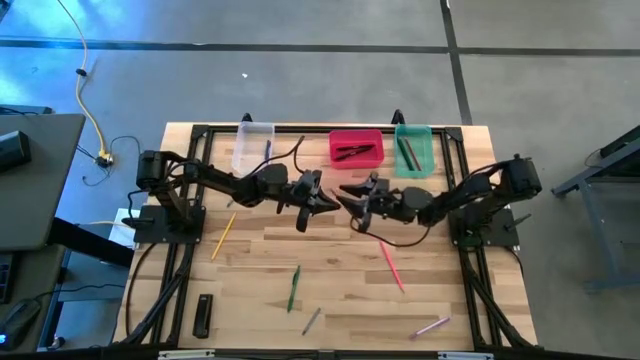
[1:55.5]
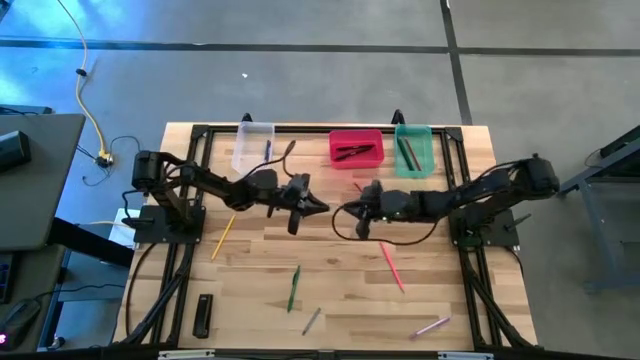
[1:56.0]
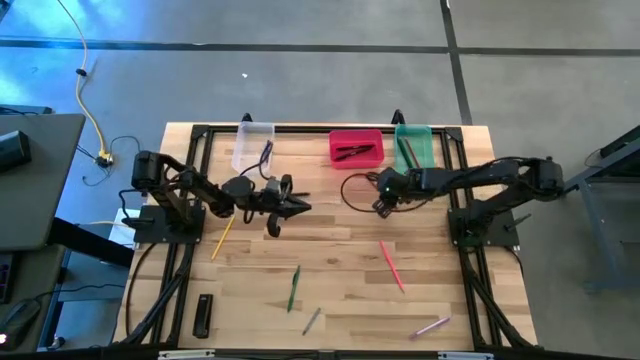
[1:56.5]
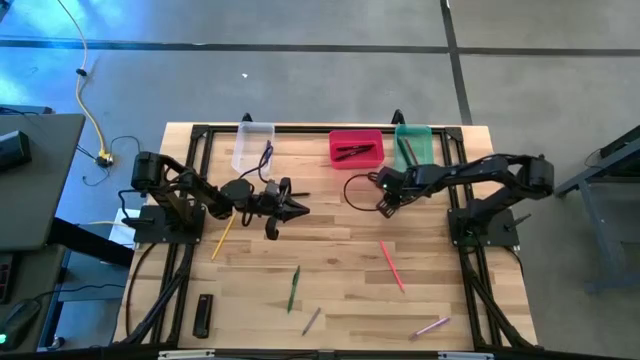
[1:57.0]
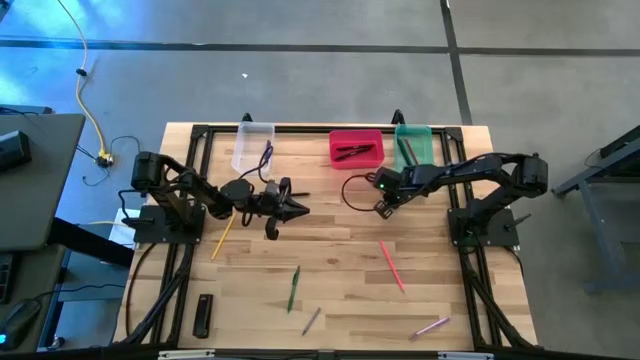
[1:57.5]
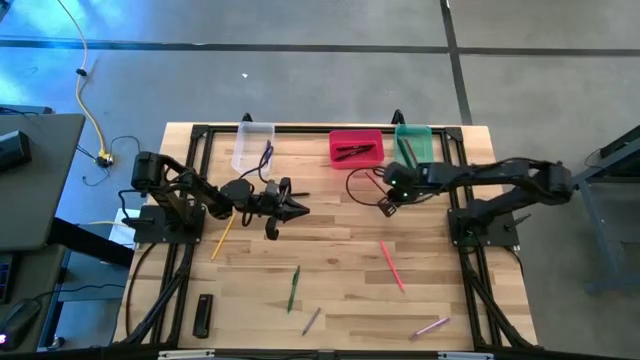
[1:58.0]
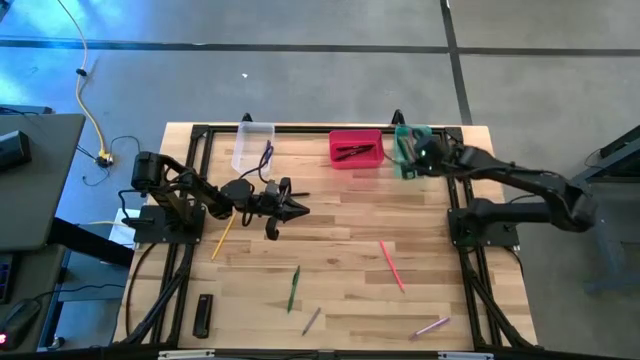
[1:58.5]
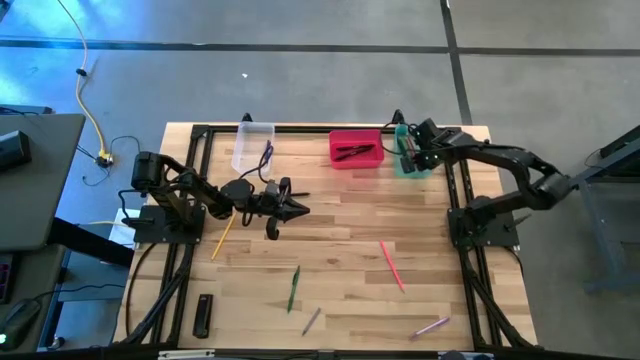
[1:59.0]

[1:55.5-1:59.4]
Task: Sort crayons/erasers/pens/pencils in bins
Put the red pencil into the blue bin

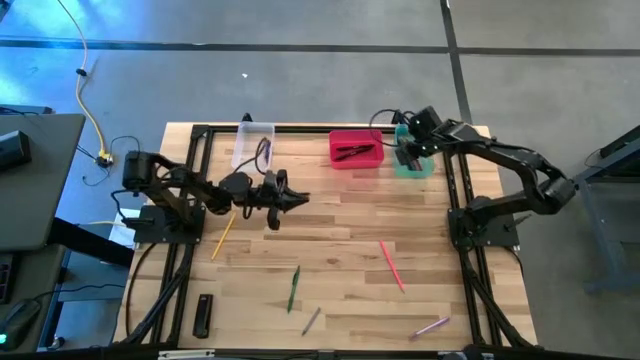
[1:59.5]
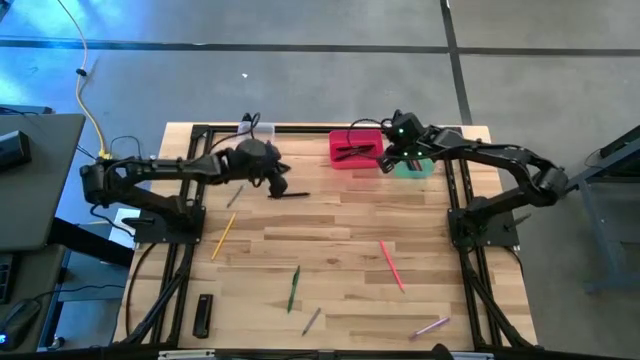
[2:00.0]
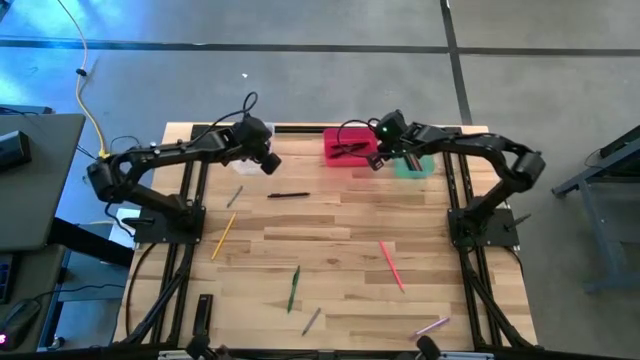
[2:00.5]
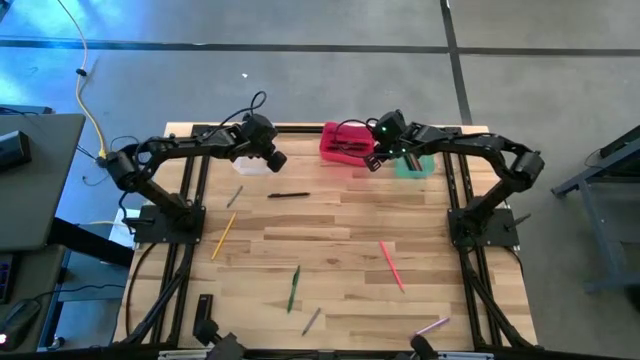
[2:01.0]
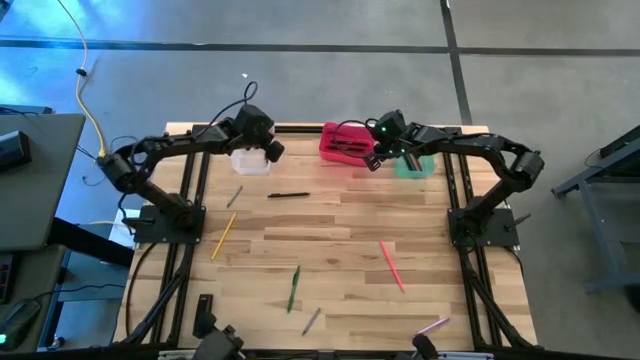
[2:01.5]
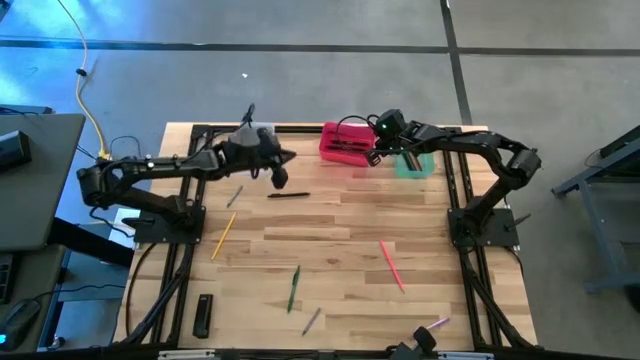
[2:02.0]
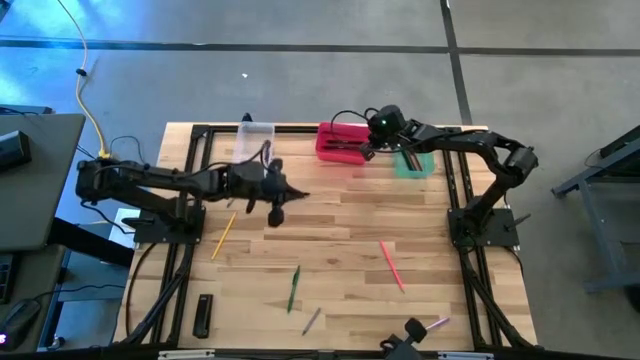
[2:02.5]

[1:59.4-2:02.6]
Adjust the red bin

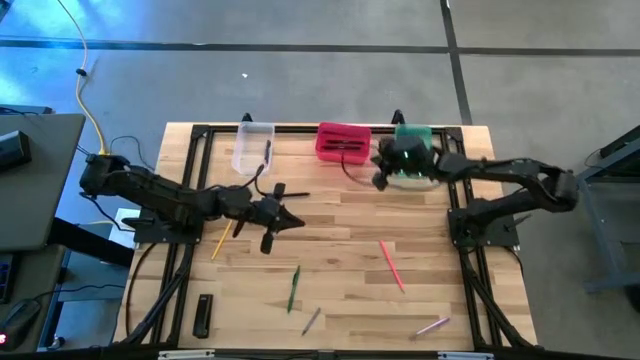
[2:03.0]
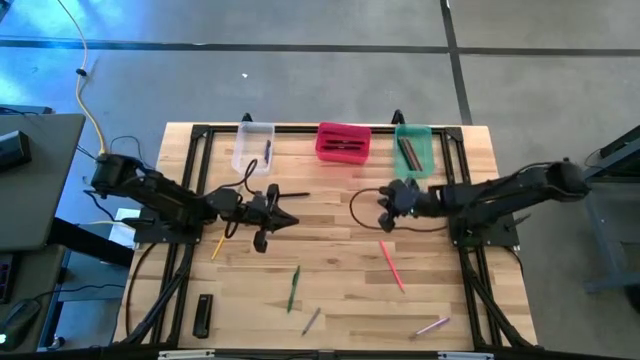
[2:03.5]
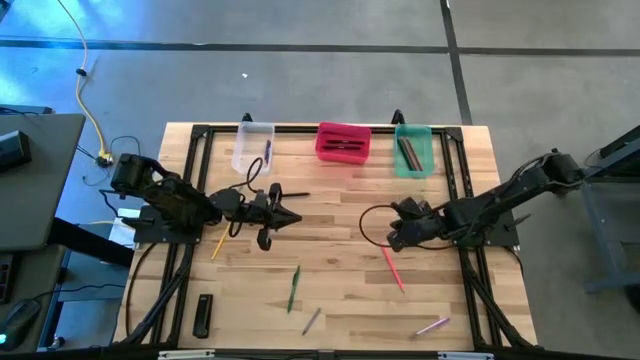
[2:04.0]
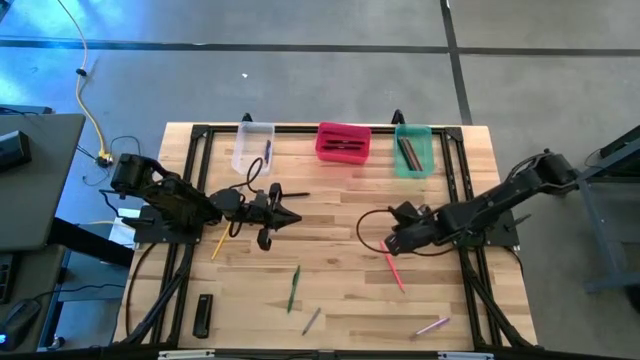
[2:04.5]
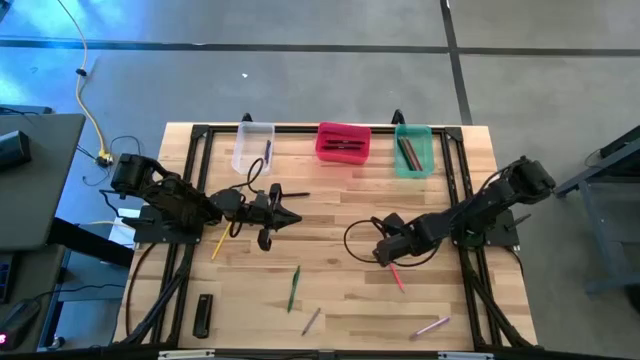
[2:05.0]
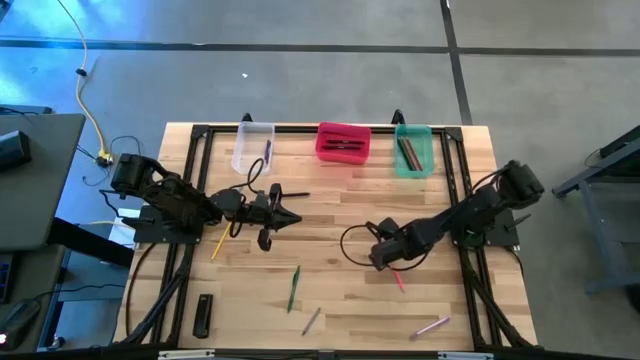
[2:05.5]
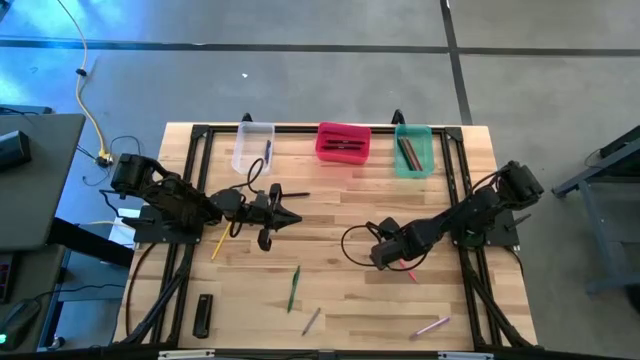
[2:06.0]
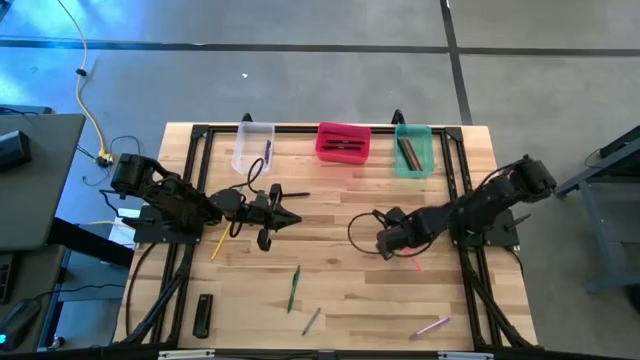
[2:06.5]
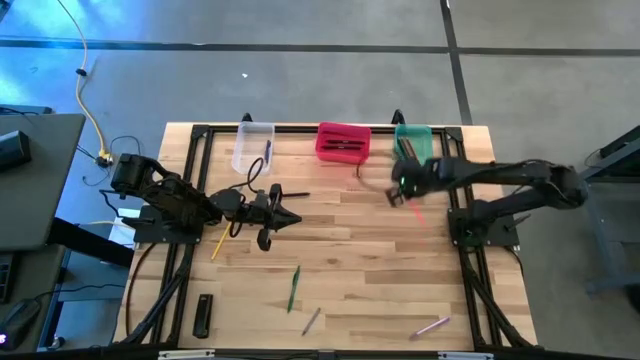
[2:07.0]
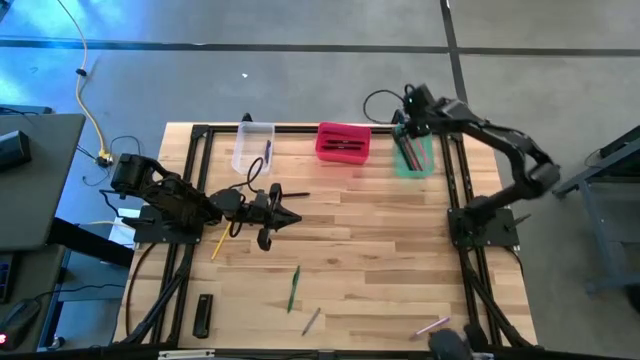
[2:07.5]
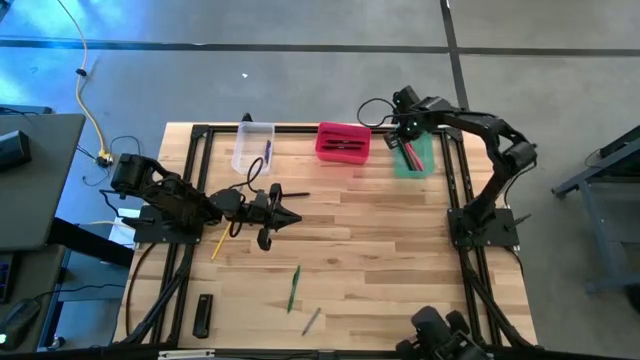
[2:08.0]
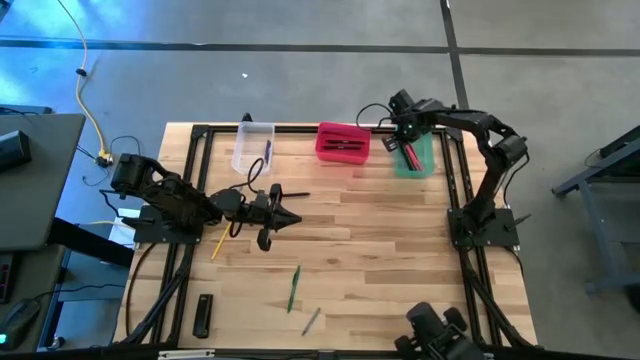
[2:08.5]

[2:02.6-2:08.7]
Put the pink pencil into the blue bin

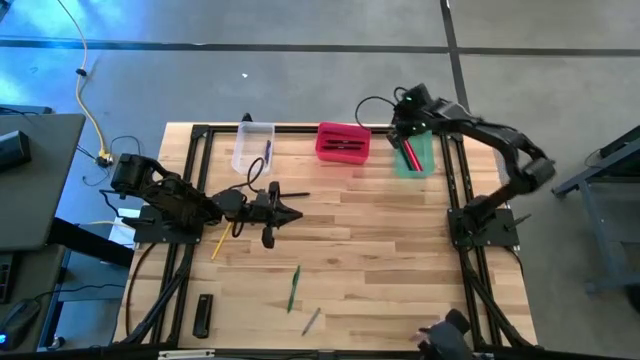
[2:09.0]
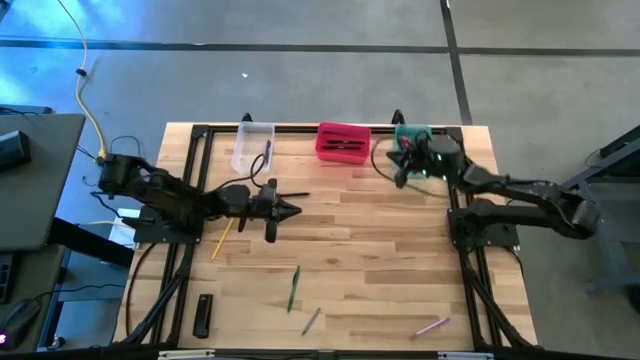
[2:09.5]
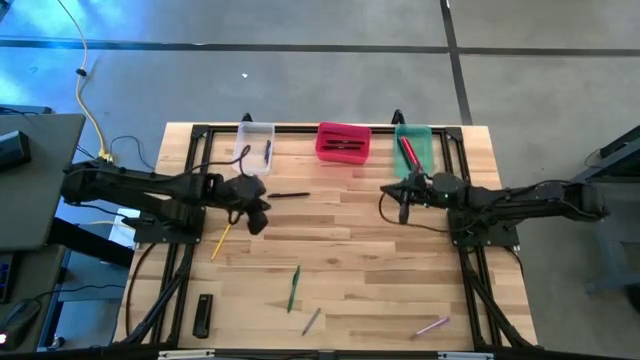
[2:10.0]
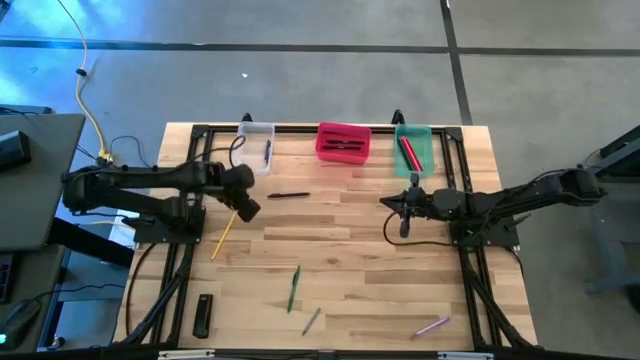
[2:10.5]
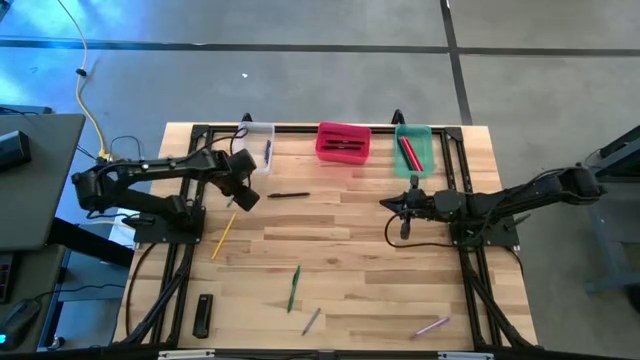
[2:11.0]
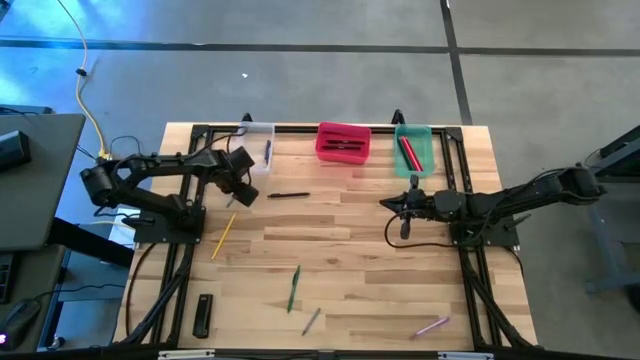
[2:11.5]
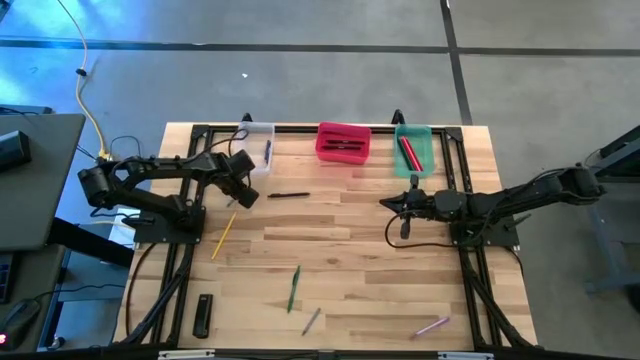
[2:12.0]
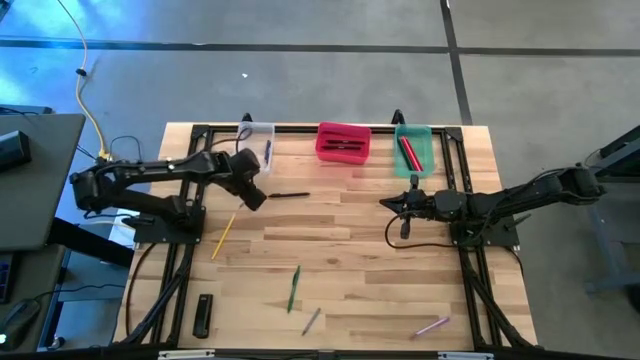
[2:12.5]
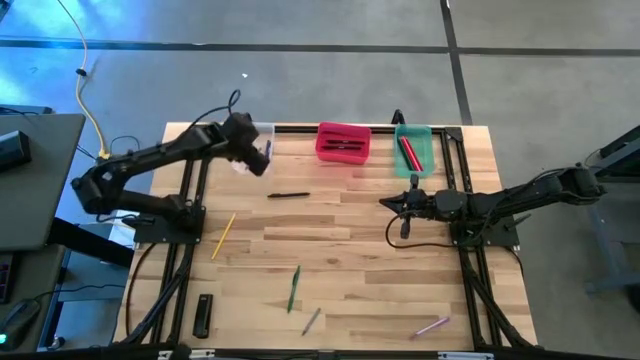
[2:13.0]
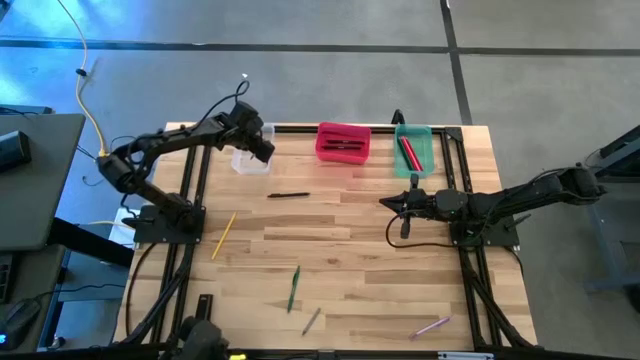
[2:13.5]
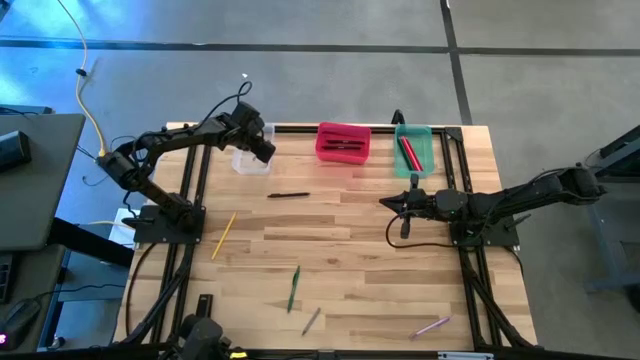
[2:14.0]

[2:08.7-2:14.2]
Put the gray crayon into the transparent bin

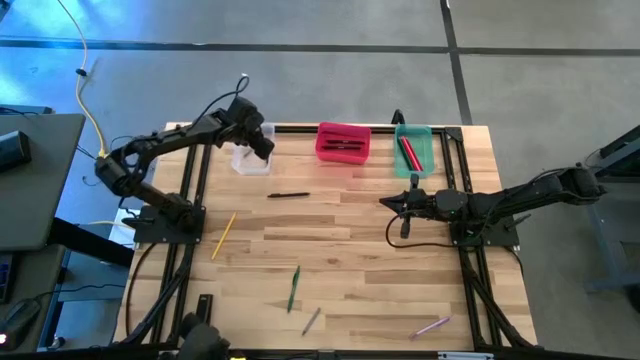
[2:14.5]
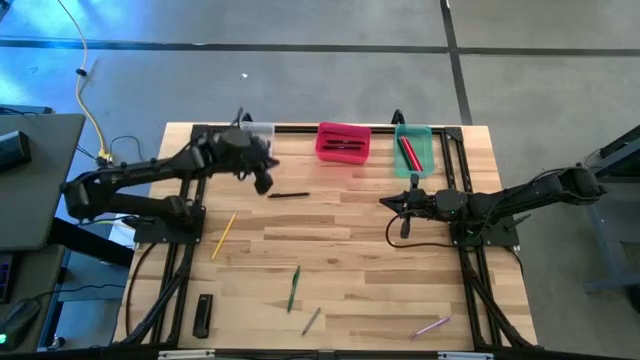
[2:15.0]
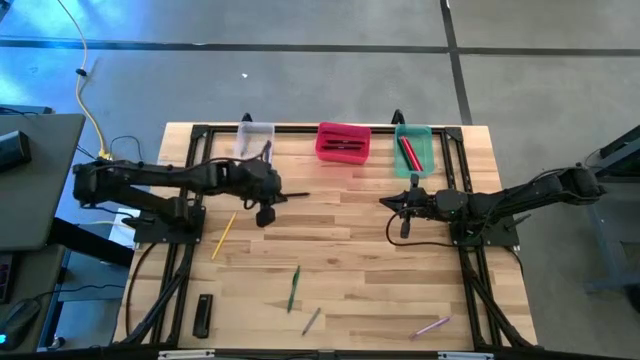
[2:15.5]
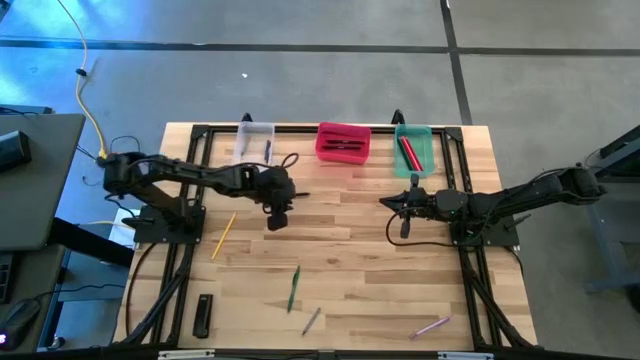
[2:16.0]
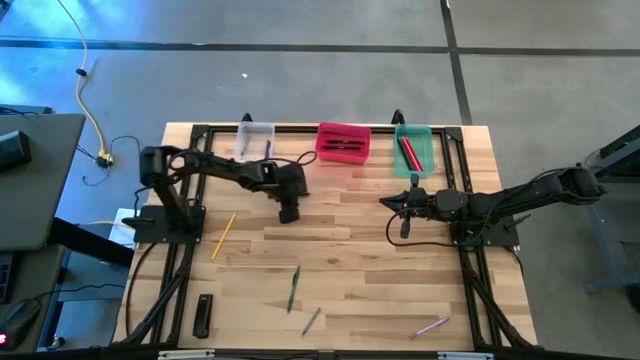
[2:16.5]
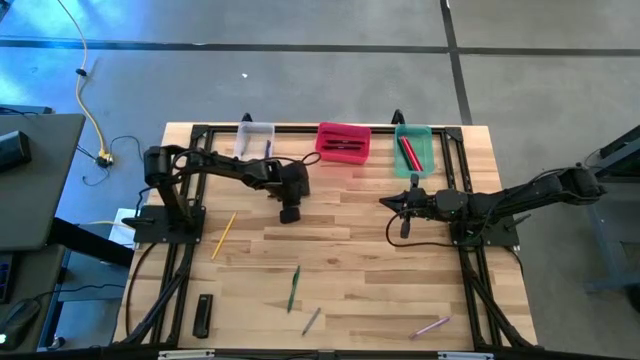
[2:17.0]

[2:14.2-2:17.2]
Put the black pen into the red bin
